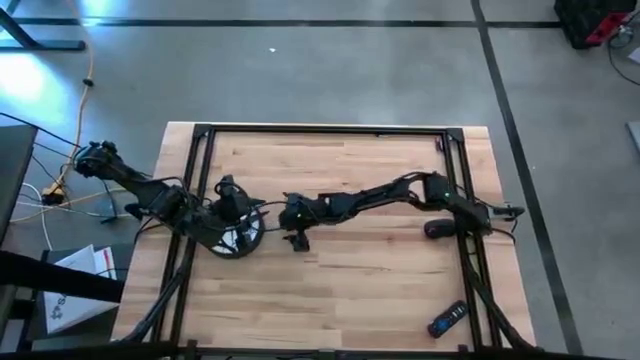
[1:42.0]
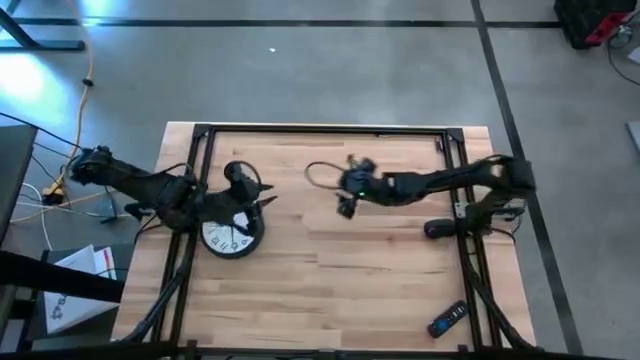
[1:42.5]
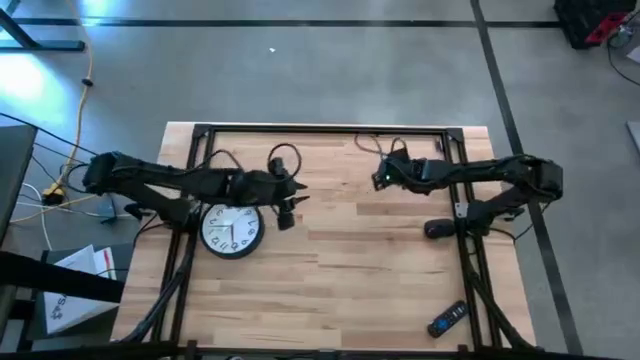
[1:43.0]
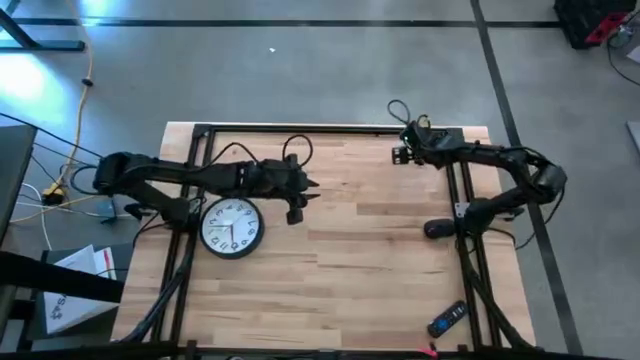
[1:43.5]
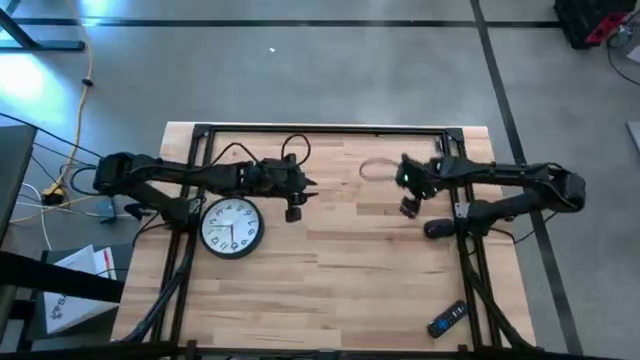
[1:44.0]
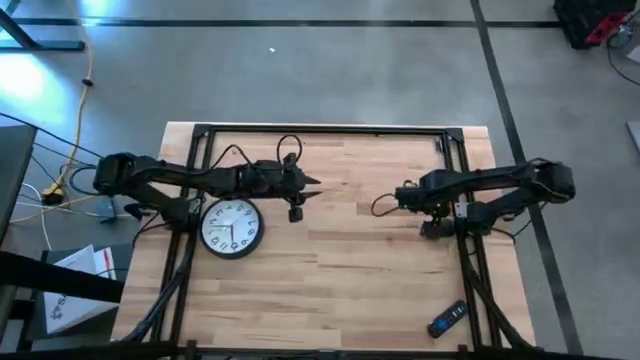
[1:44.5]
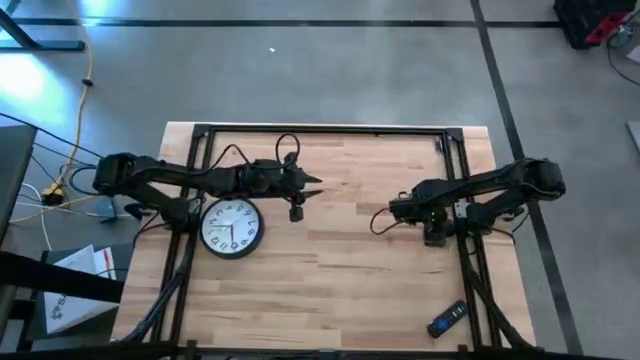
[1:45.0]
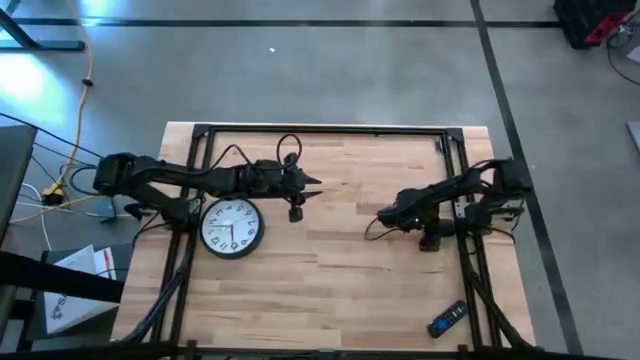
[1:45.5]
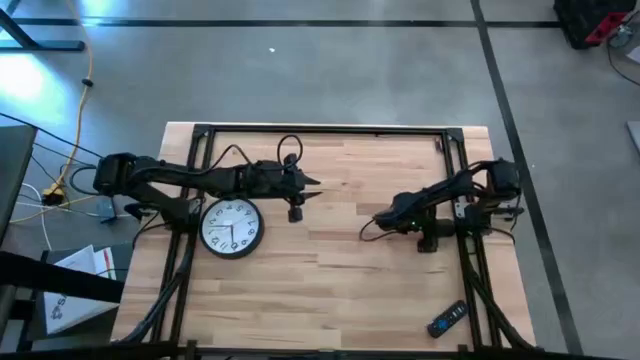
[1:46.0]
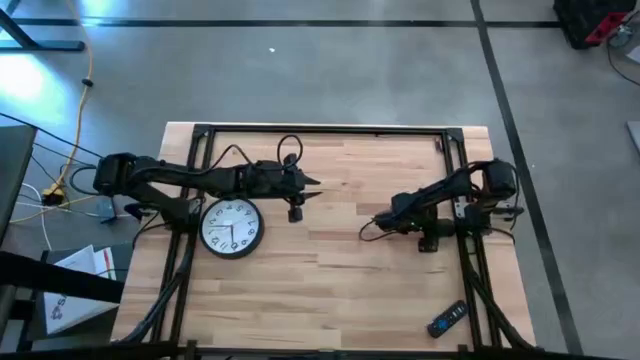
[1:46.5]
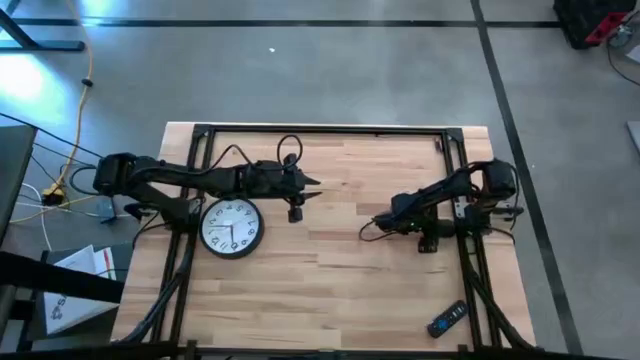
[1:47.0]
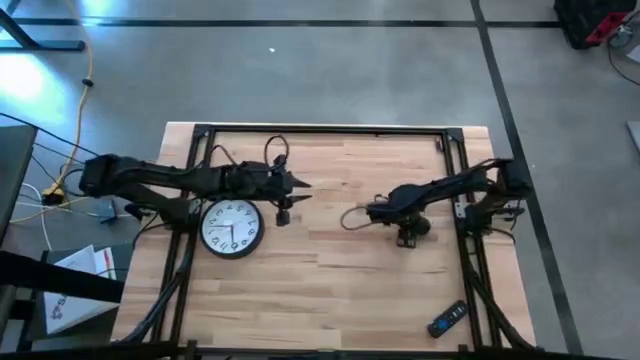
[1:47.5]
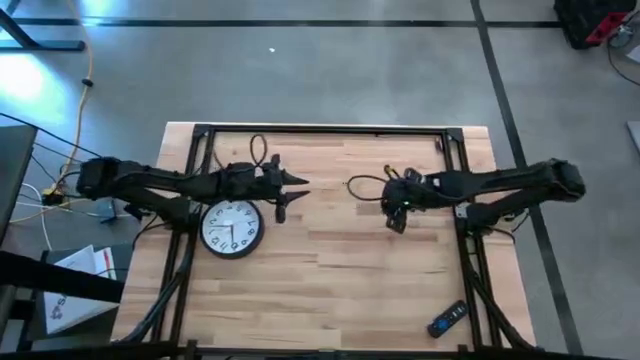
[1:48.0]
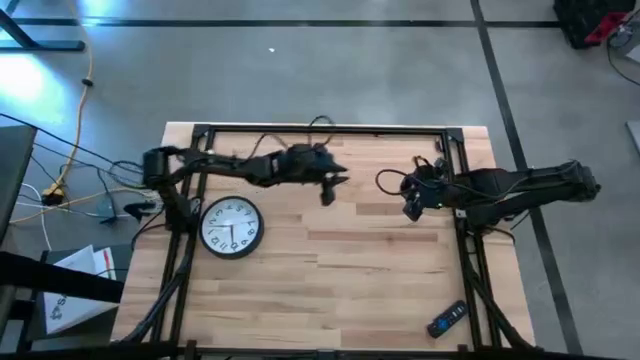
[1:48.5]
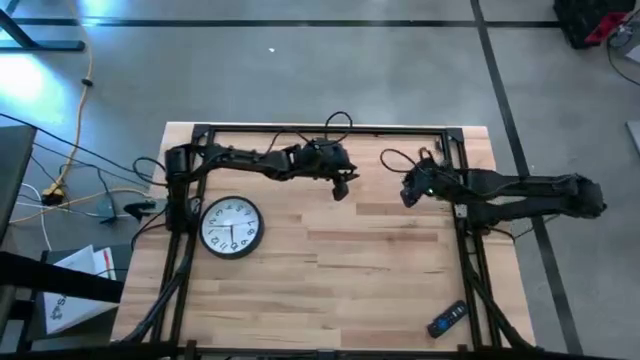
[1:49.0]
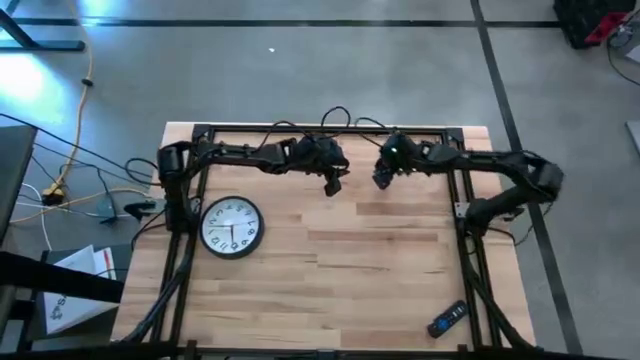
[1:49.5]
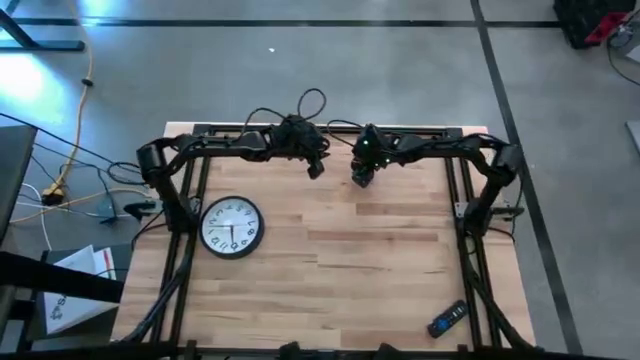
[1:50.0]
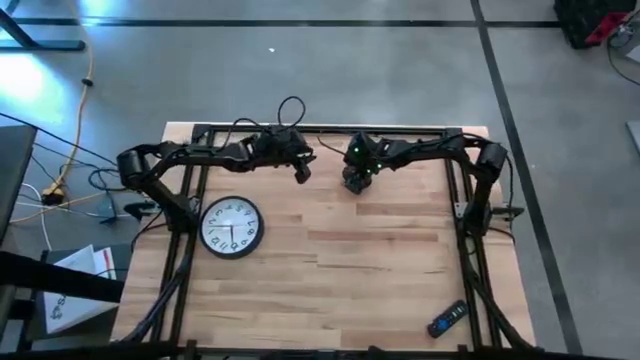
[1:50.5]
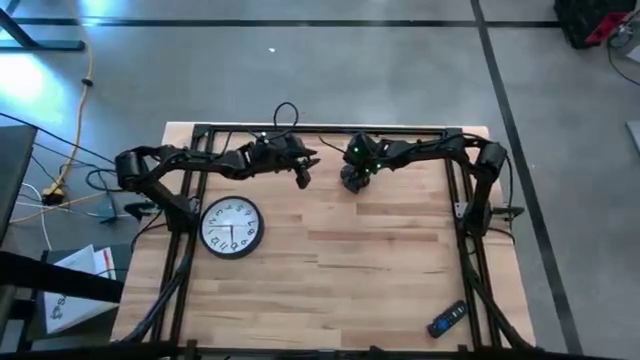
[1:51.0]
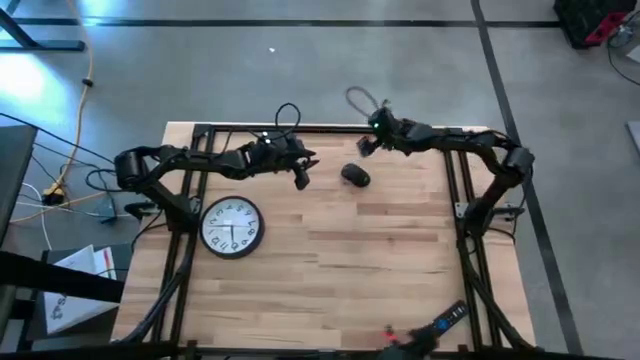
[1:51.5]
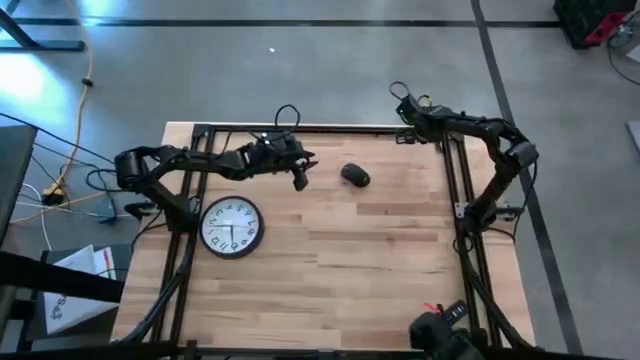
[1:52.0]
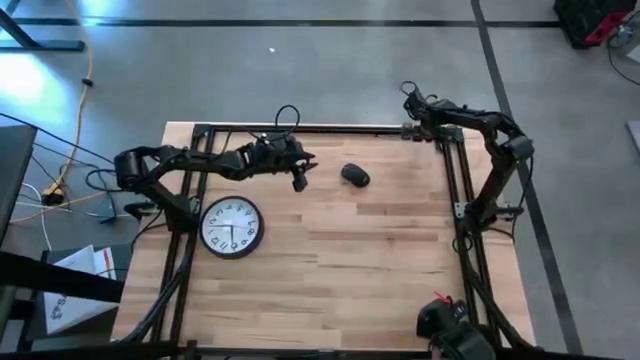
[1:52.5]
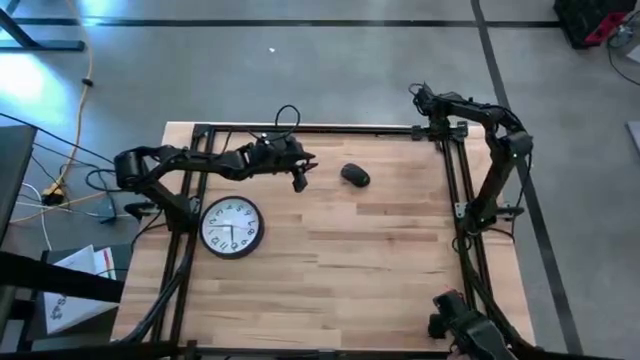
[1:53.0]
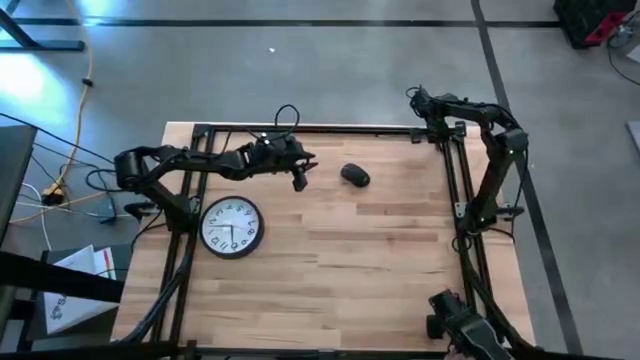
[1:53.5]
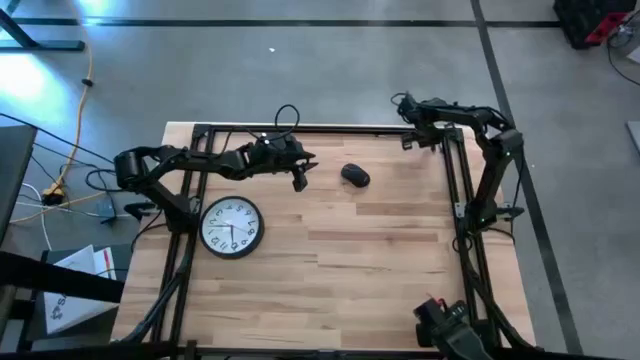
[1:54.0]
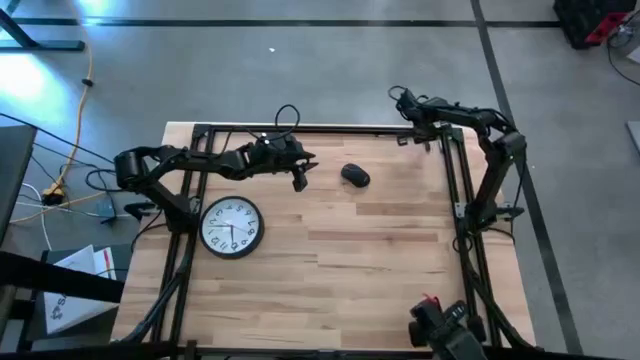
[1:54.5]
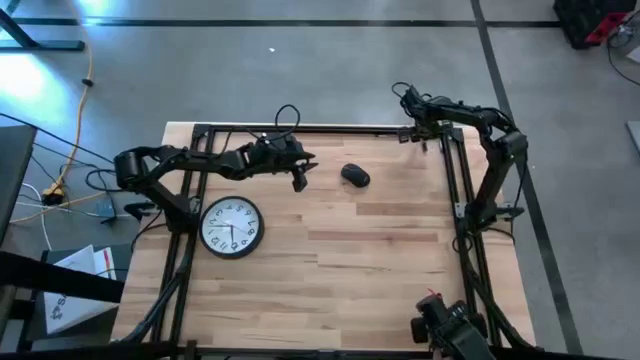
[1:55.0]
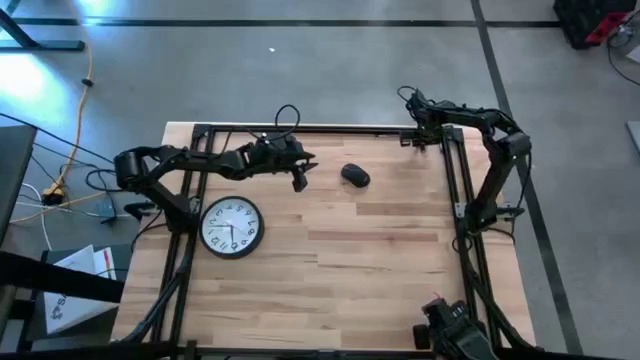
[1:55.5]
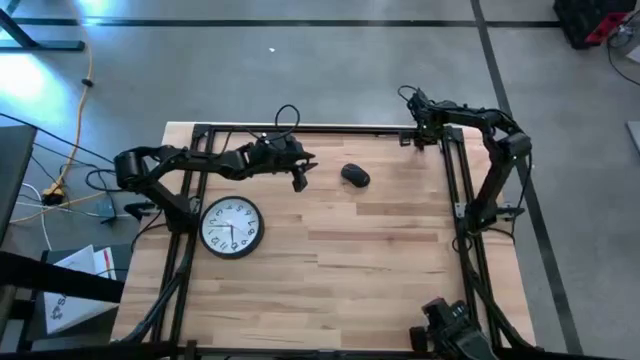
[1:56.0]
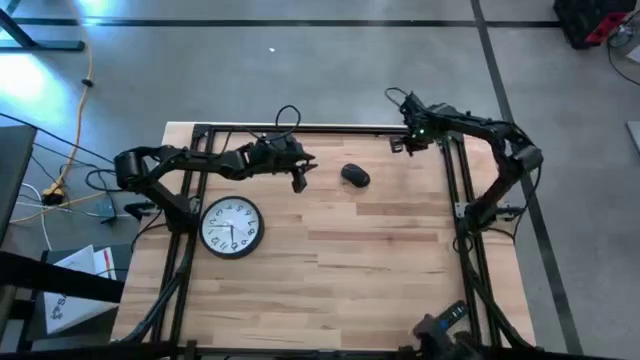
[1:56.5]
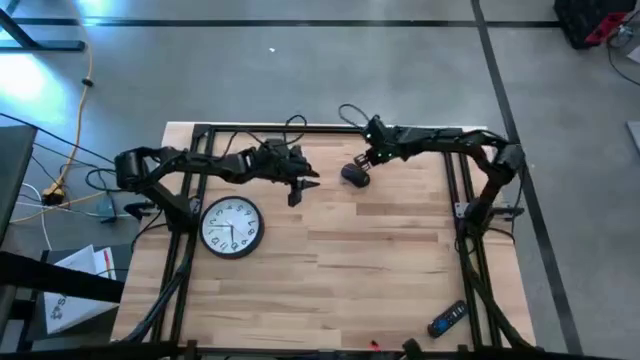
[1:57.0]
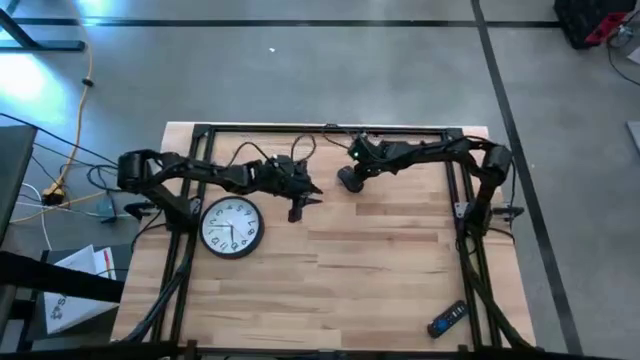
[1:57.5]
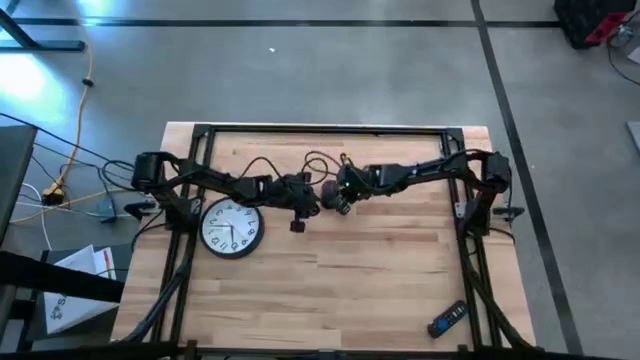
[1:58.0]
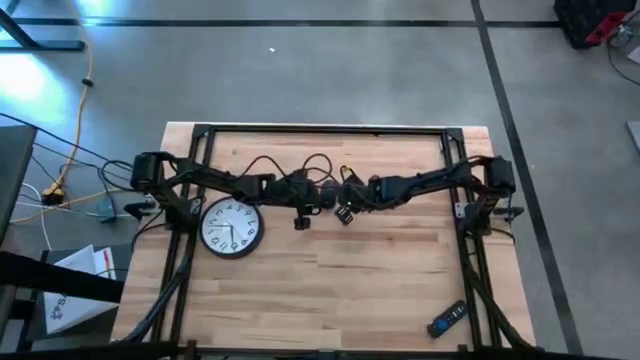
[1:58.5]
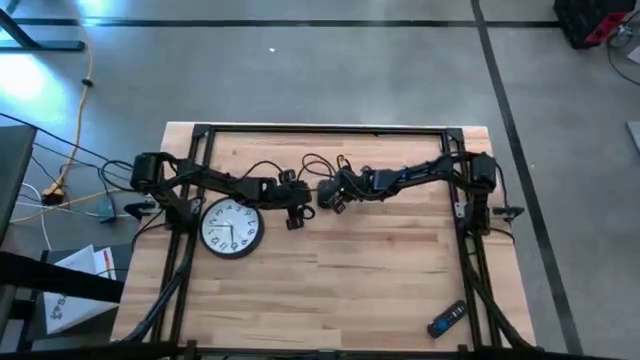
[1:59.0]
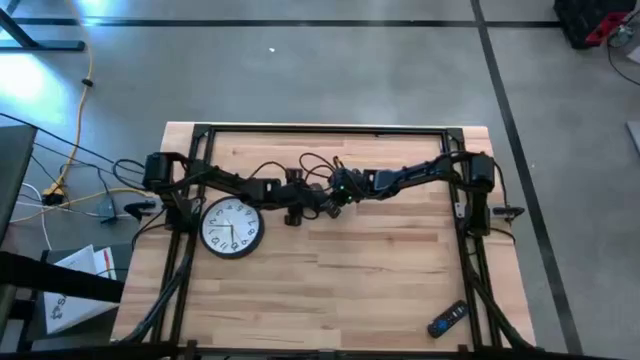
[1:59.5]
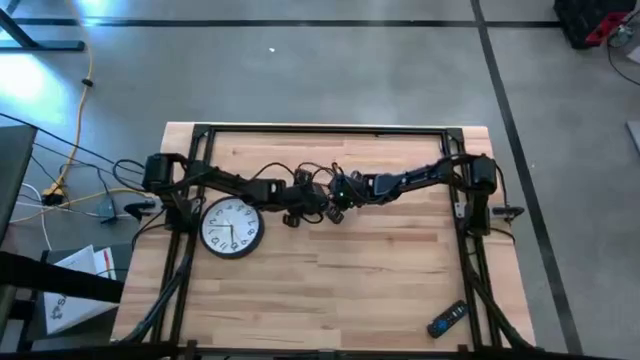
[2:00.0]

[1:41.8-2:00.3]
Task: Insert battery
Insert the black battery into the black computer mouse

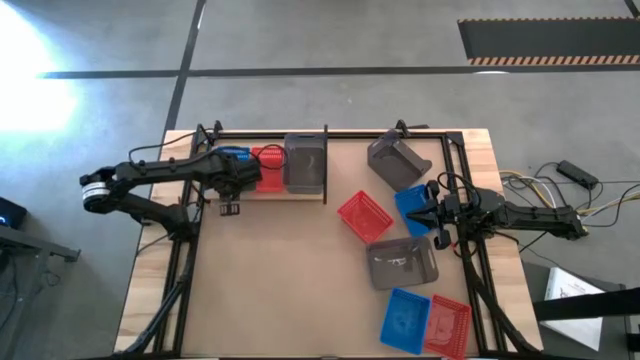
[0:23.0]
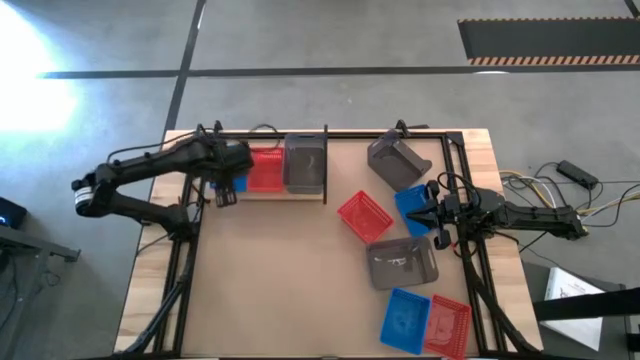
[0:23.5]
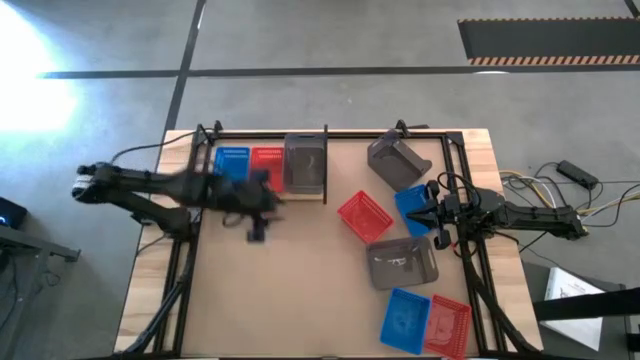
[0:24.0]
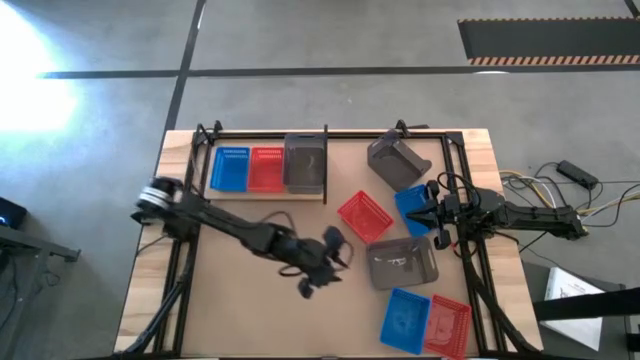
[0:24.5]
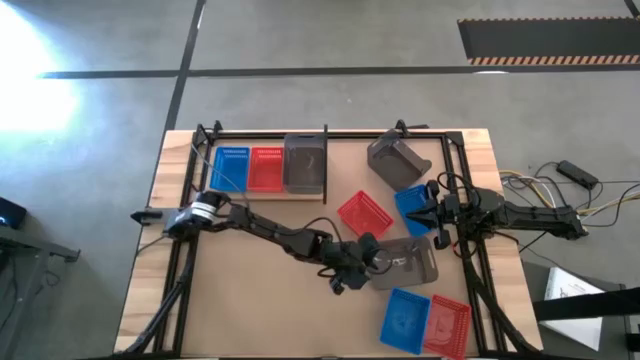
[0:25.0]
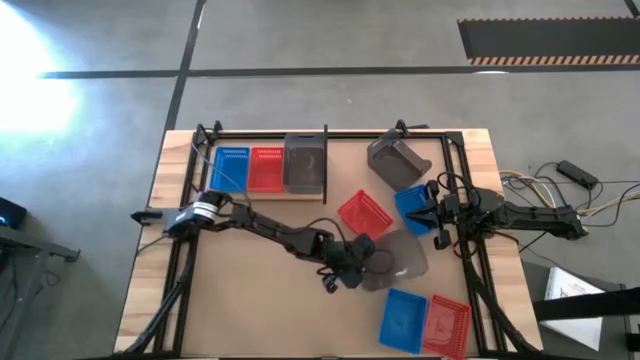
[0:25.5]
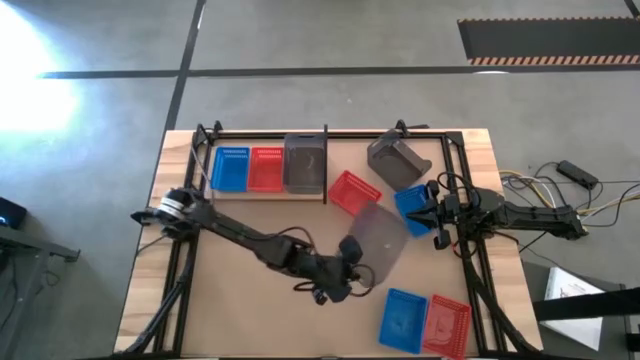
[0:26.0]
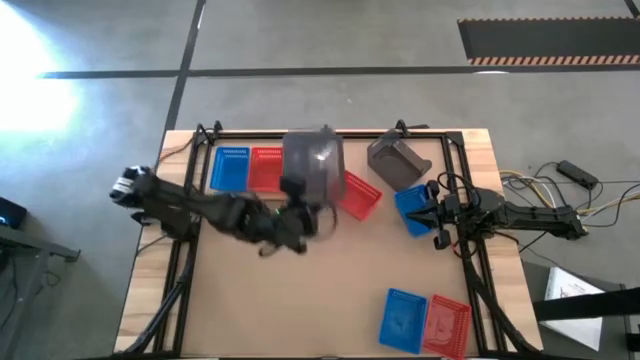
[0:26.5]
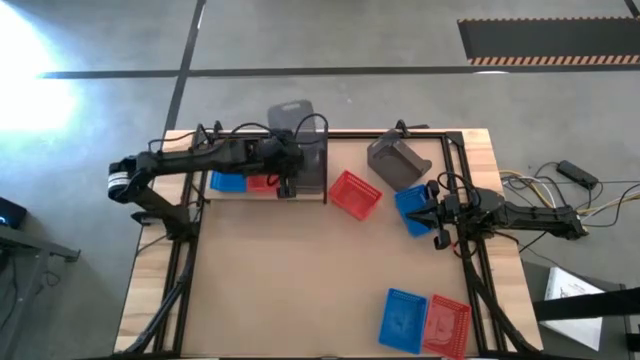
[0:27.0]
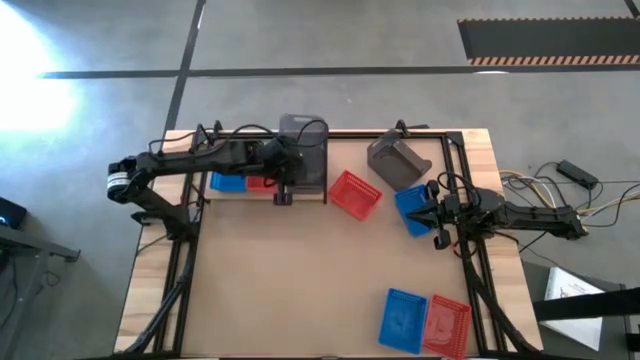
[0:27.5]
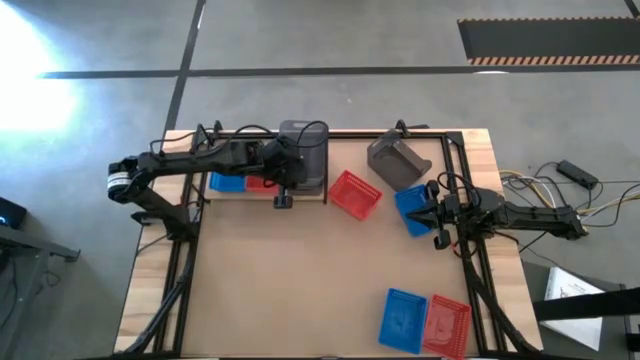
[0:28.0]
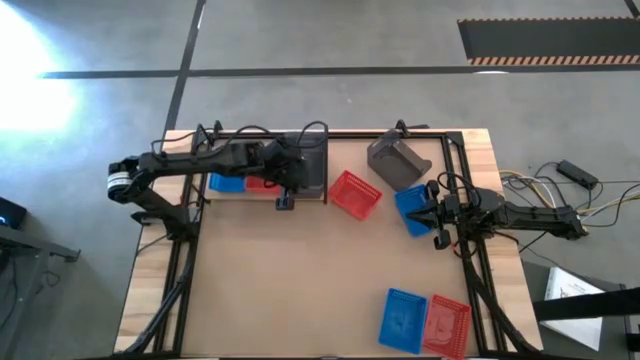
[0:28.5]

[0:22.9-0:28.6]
Task: Stack baskets on shelf by color
Stack the bottom black bin on the black bin on the shelf
